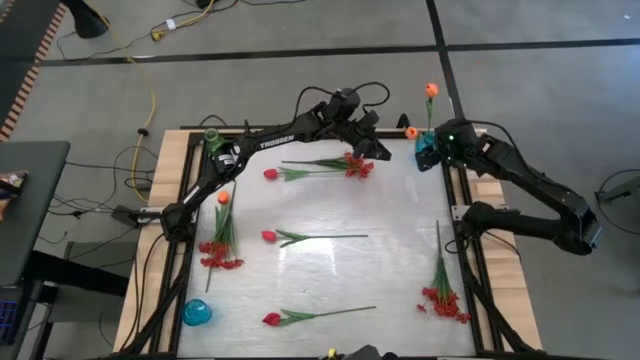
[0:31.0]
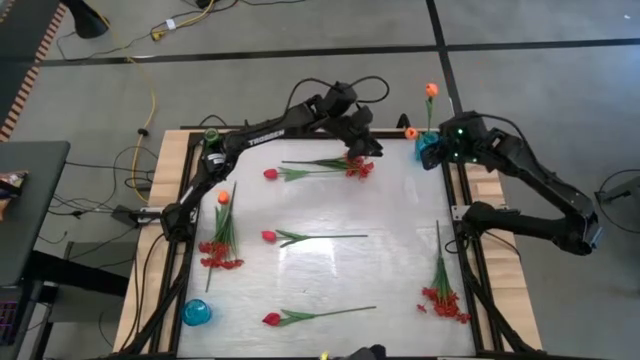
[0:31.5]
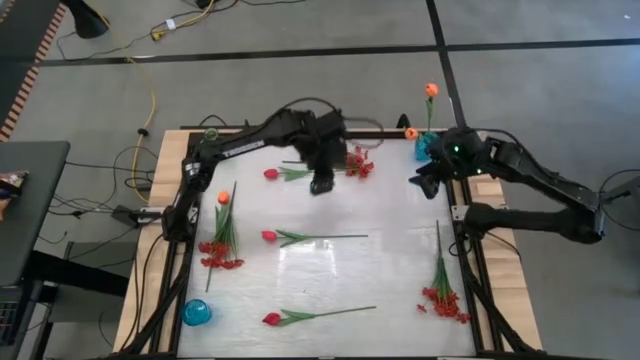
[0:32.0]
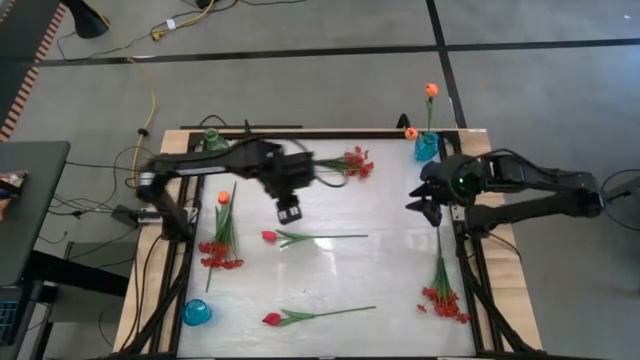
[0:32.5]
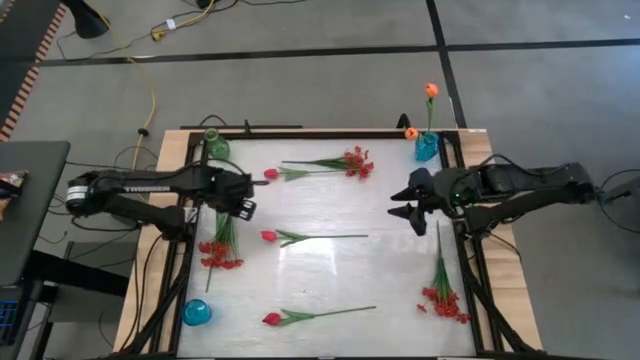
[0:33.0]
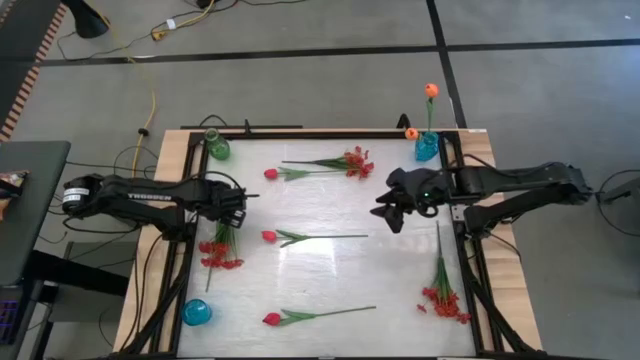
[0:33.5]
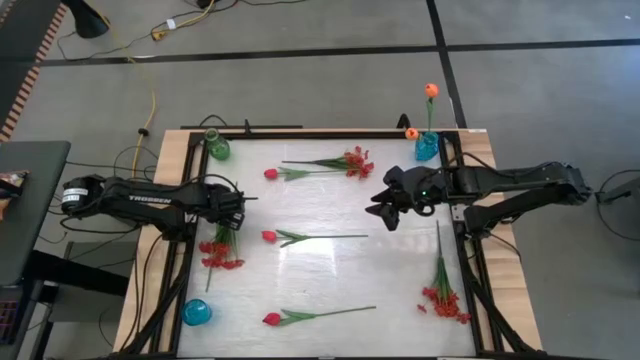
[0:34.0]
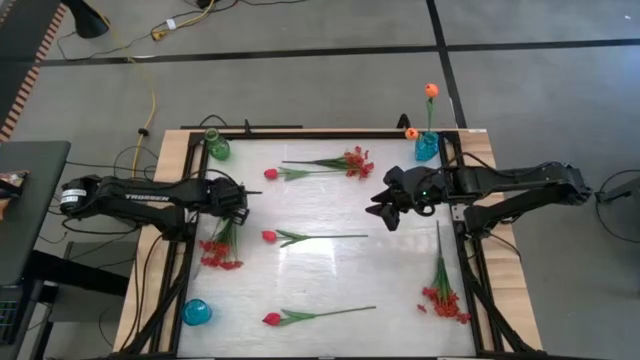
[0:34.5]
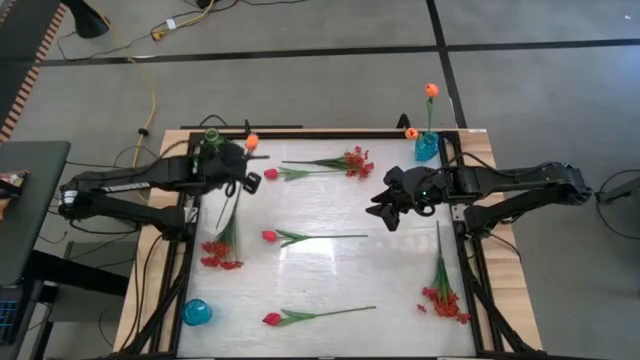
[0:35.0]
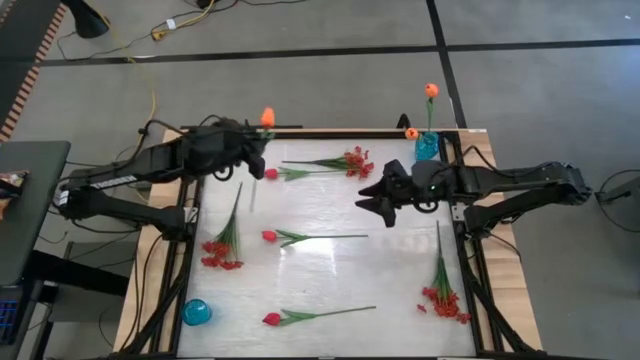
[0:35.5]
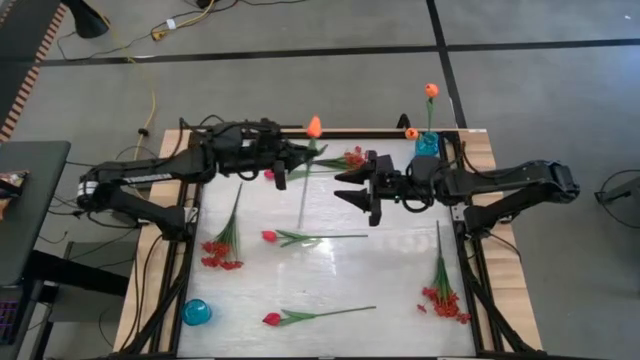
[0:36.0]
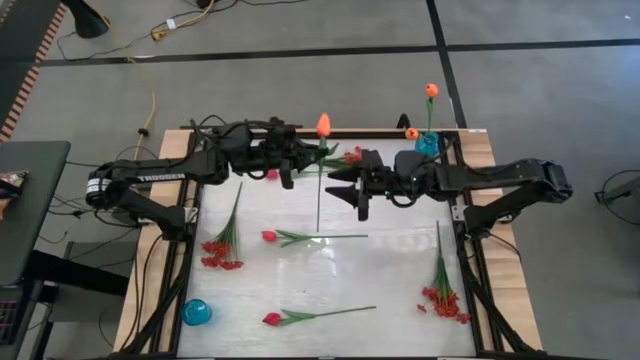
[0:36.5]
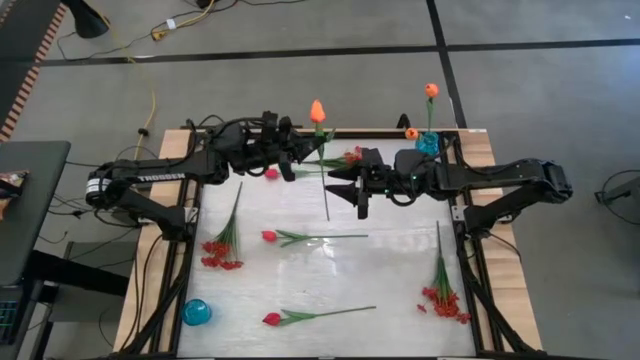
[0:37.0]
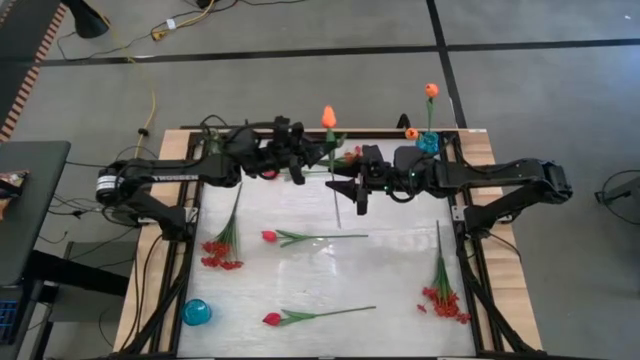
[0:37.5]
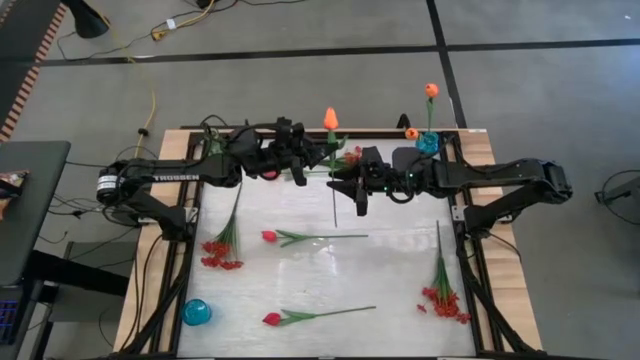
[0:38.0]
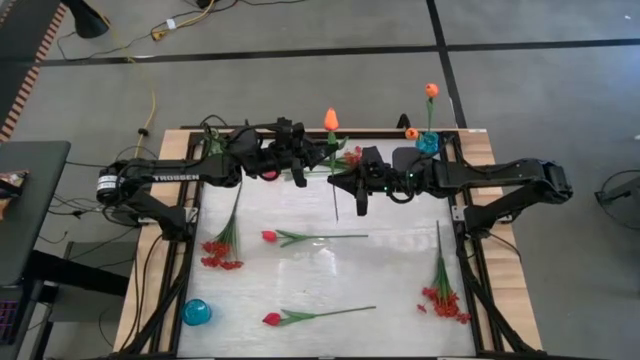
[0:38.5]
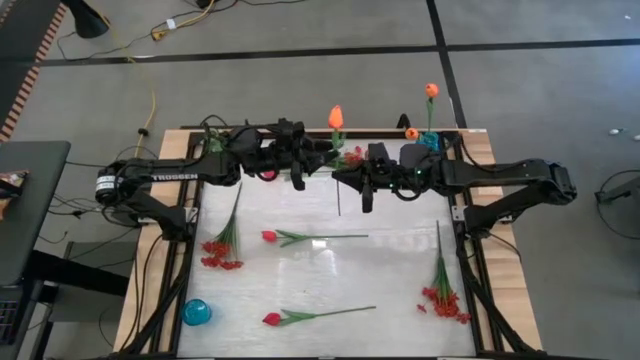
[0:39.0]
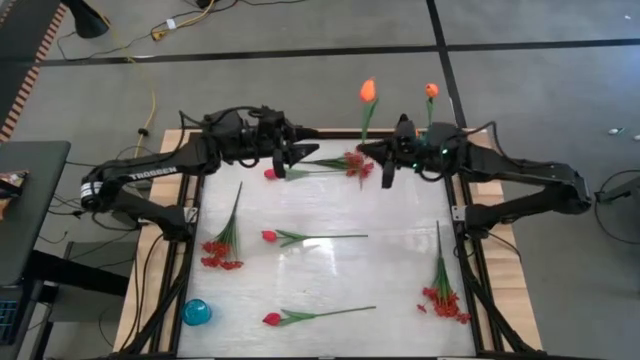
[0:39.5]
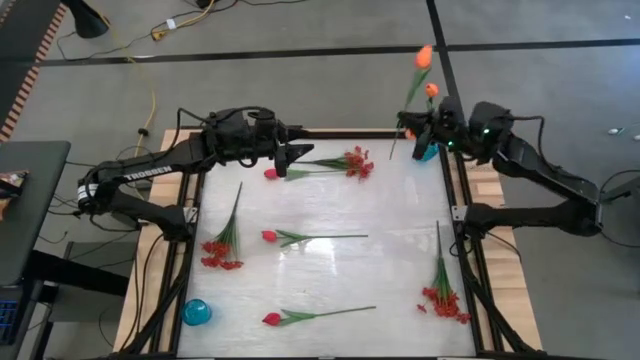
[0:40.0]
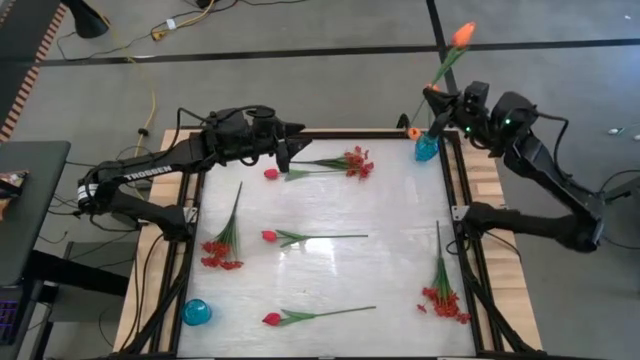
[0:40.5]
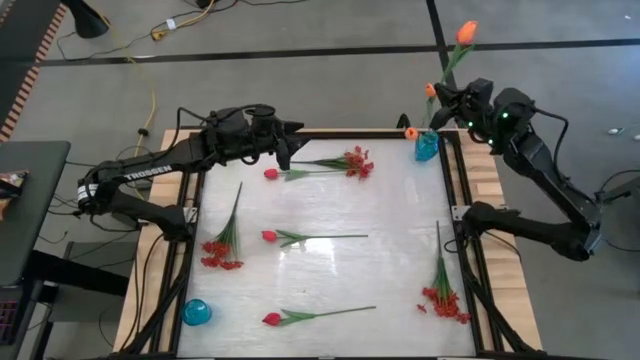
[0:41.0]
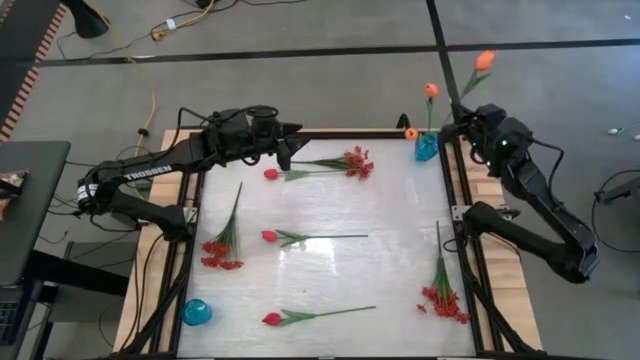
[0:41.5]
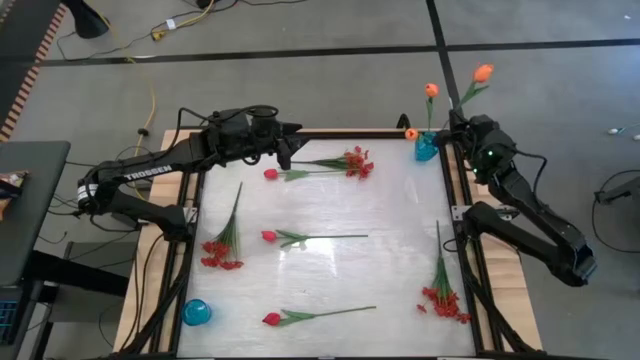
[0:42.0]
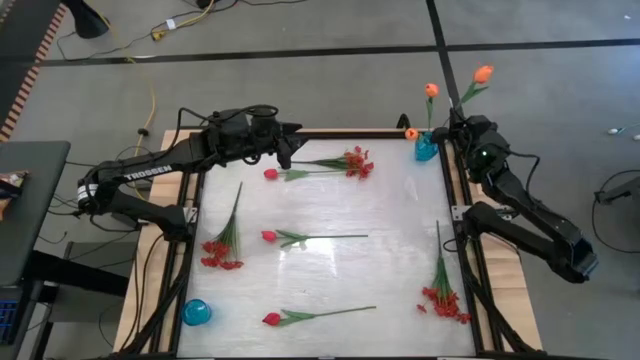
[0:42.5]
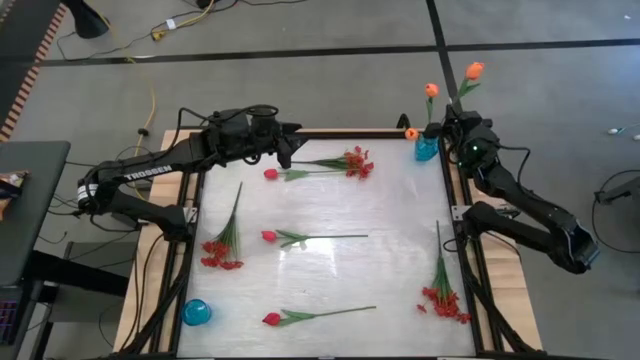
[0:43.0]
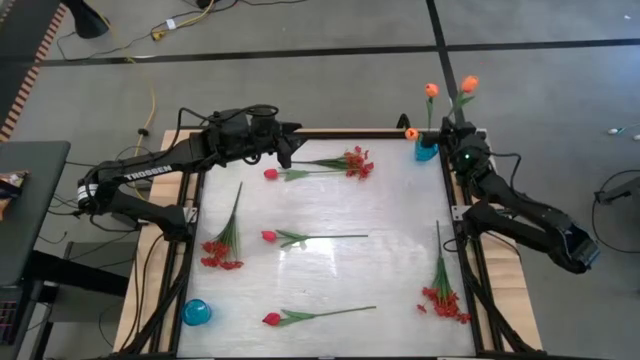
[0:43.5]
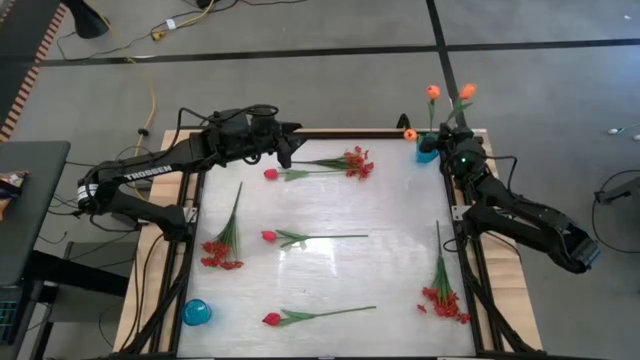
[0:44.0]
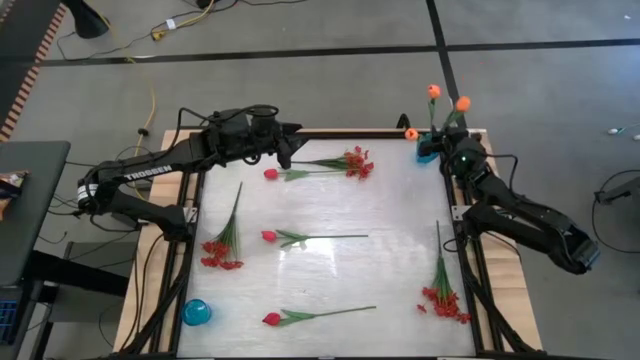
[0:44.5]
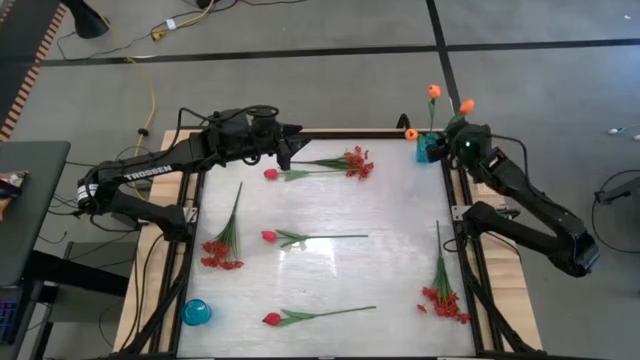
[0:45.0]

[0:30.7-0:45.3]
Task: Sort flowers into vase by color
Put the orange tulip into the top blue vase

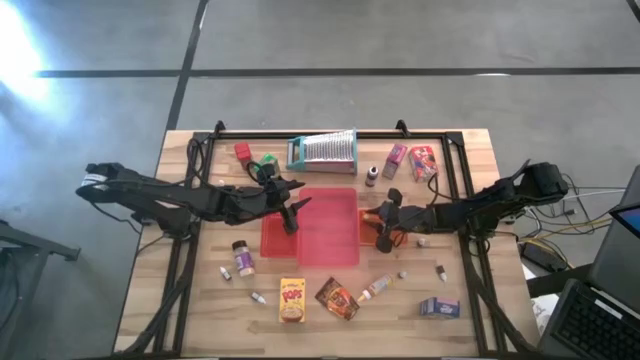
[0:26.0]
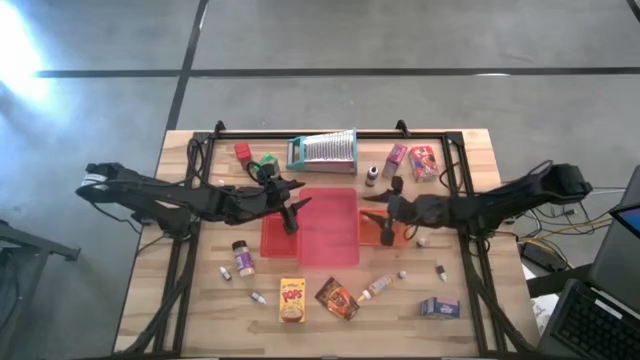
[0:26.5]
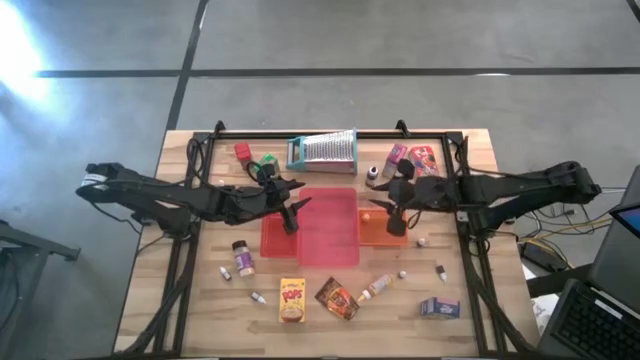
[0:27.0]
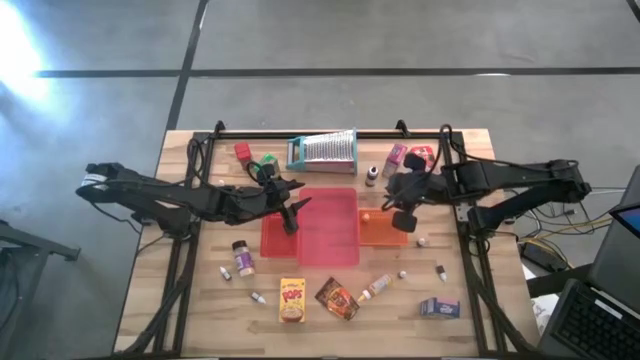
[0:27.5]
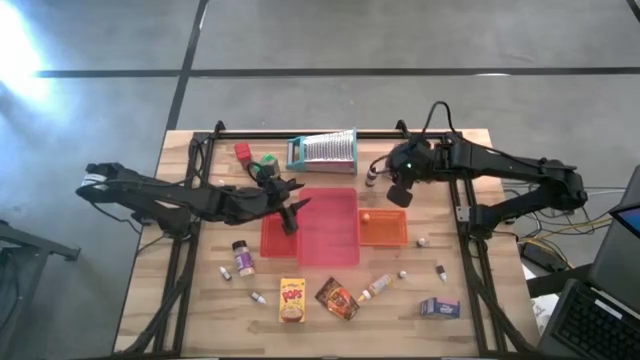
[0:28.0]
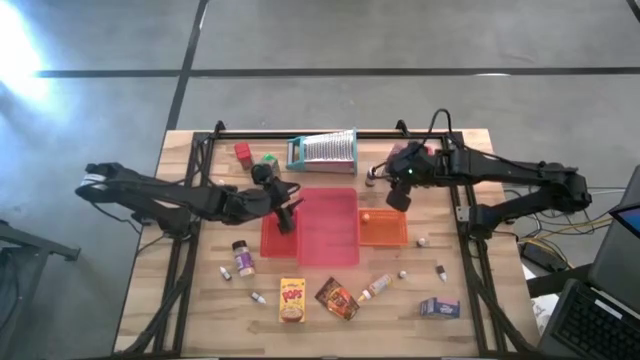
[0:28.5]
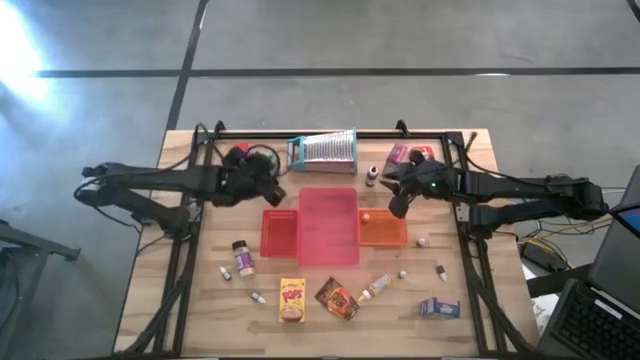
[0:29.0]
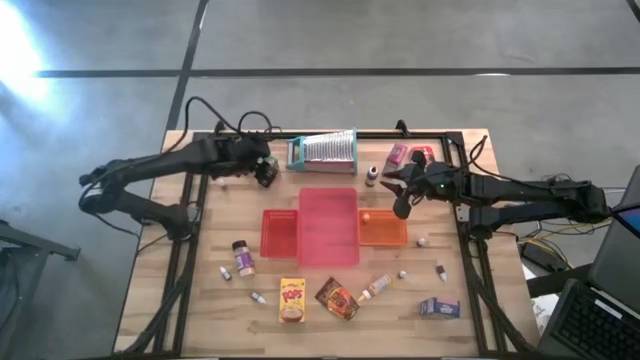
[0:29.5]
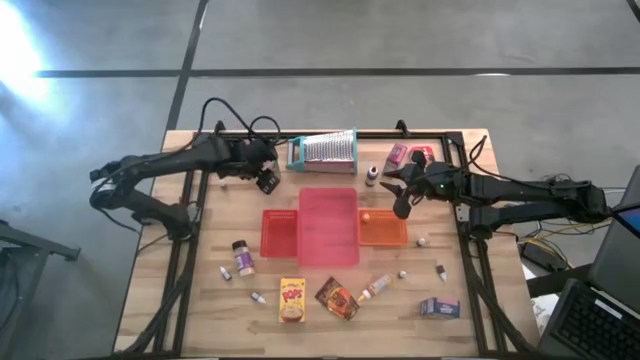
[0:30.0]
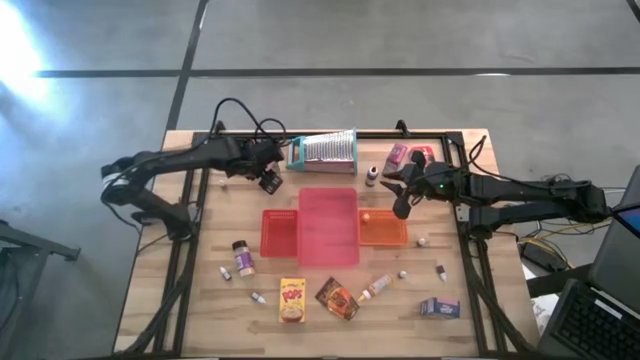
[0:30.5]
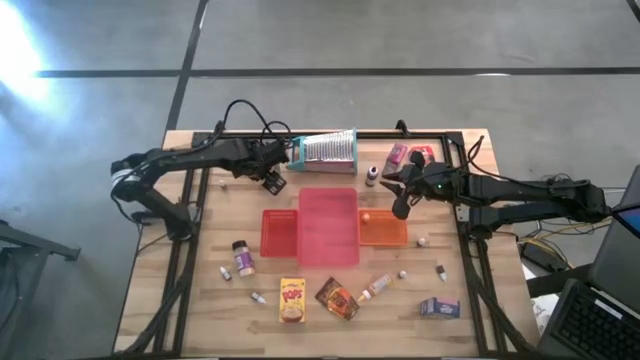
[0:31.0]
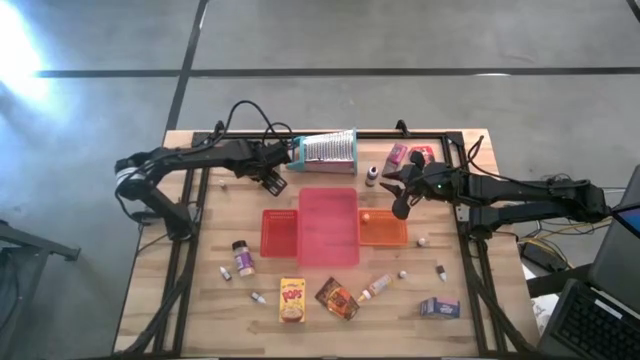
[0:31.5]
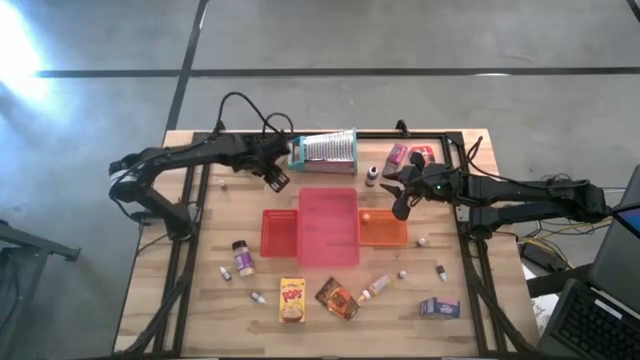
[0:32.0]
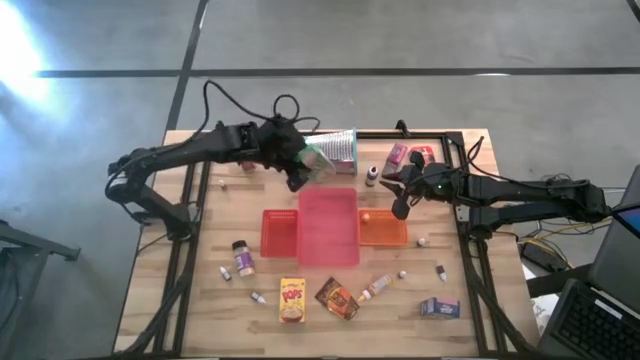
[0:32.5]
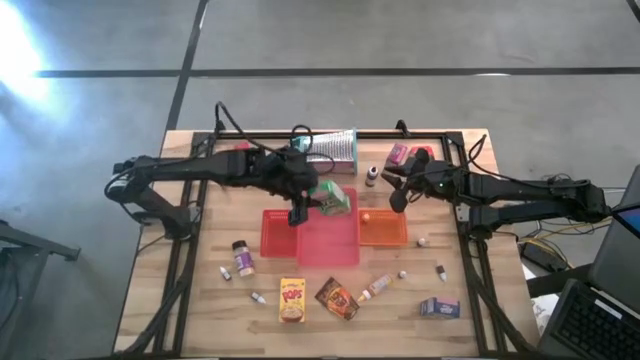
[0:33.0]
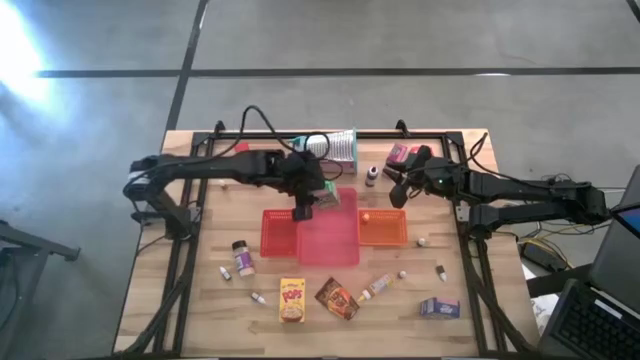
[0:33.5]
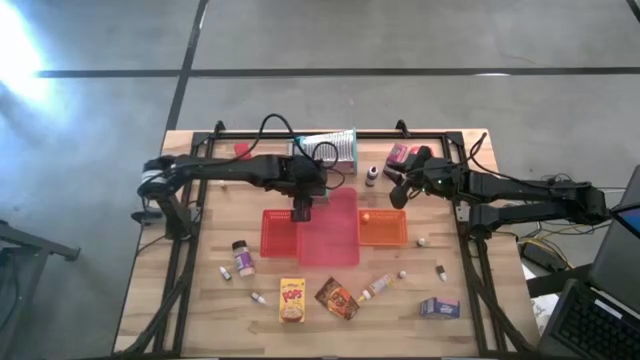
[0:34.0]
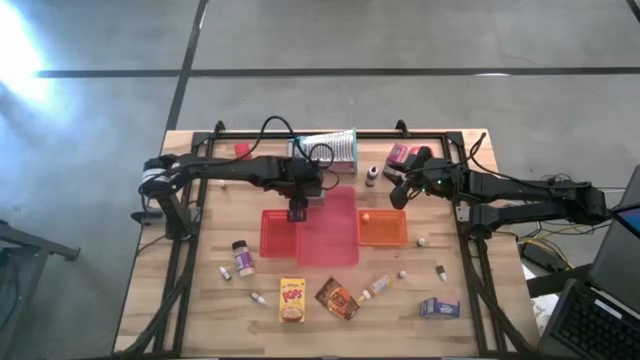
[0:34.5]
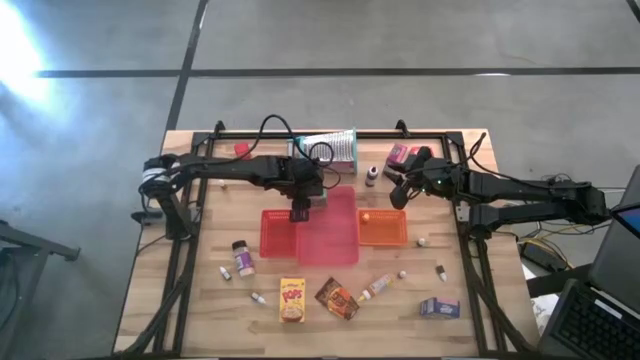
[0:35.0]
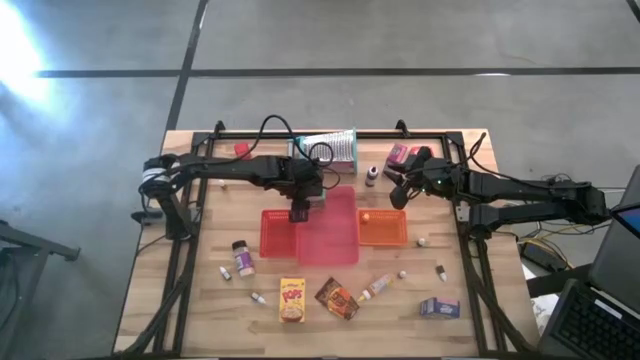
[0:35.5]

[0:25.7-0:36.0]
Task: Pick & Place Kitchen Items
Put the green cereal box into the pink bin
